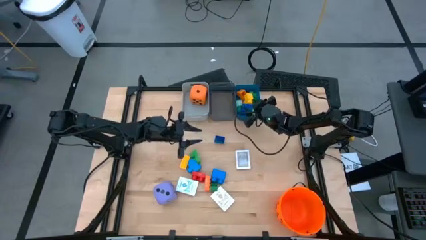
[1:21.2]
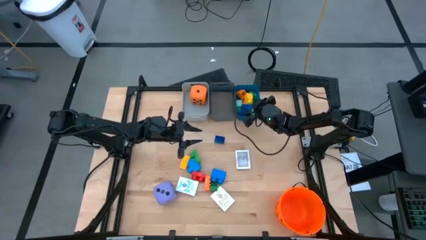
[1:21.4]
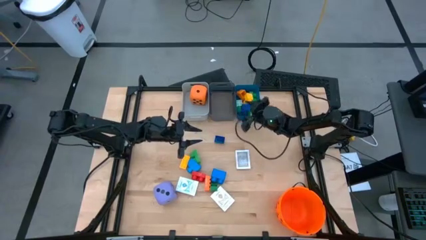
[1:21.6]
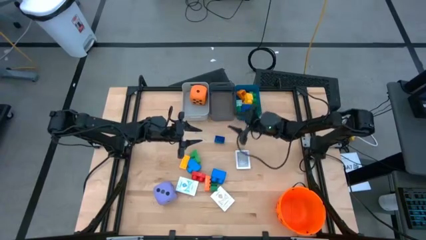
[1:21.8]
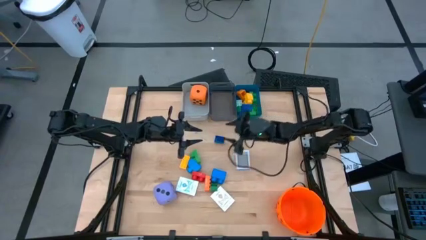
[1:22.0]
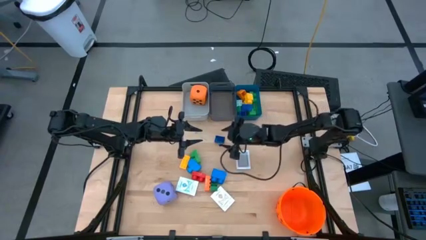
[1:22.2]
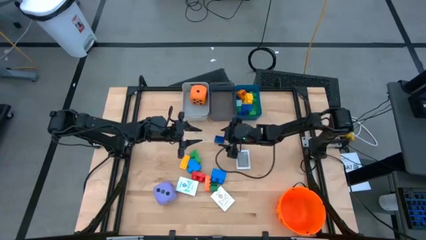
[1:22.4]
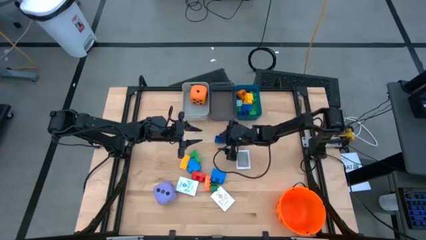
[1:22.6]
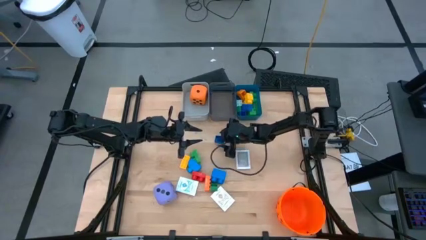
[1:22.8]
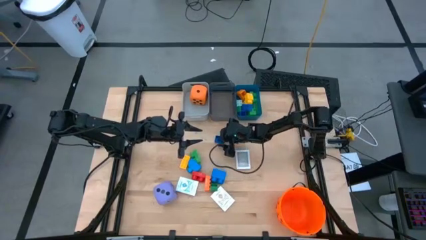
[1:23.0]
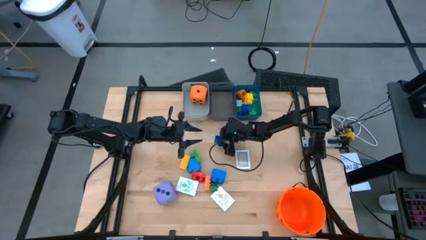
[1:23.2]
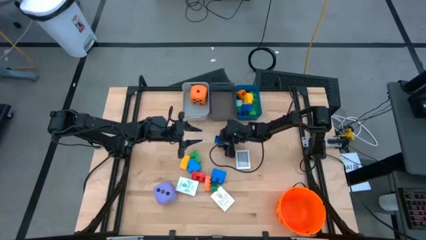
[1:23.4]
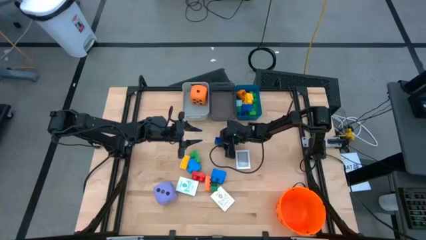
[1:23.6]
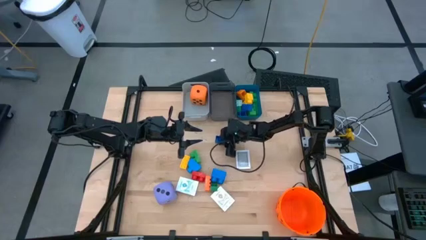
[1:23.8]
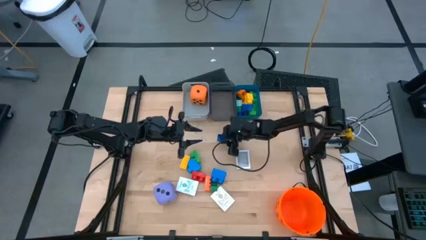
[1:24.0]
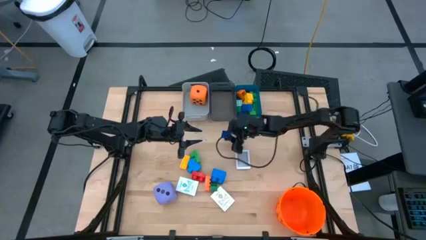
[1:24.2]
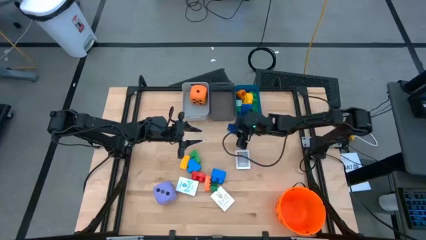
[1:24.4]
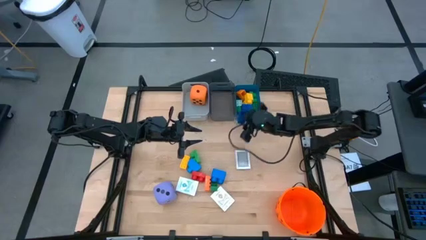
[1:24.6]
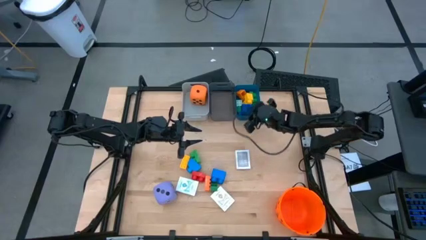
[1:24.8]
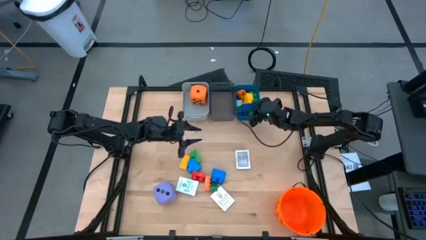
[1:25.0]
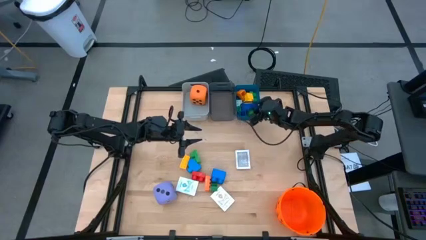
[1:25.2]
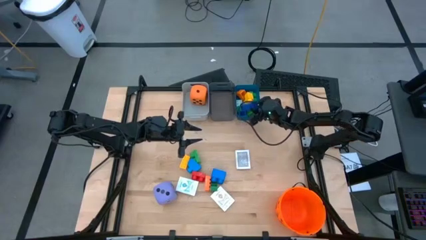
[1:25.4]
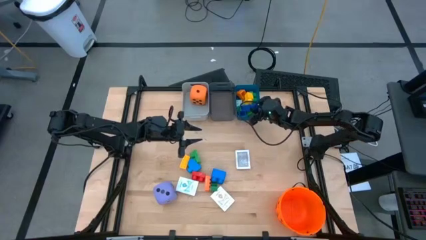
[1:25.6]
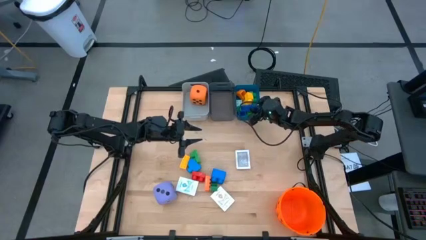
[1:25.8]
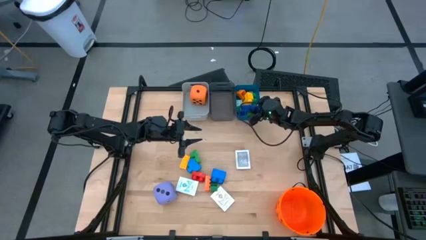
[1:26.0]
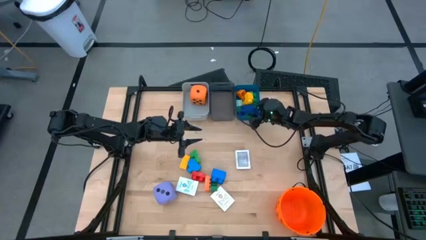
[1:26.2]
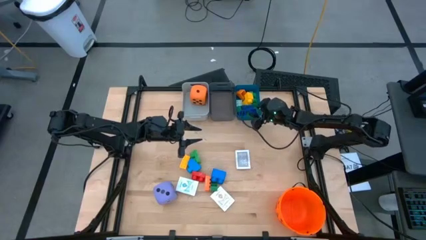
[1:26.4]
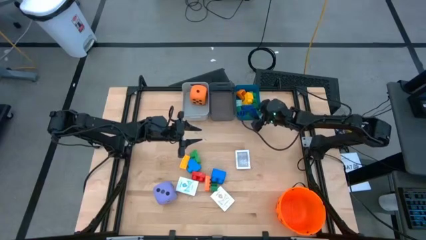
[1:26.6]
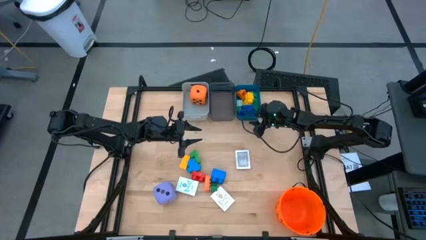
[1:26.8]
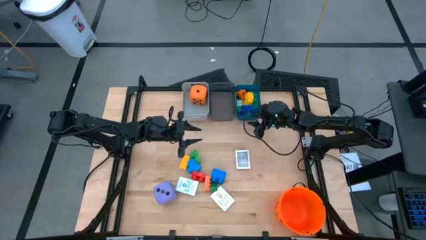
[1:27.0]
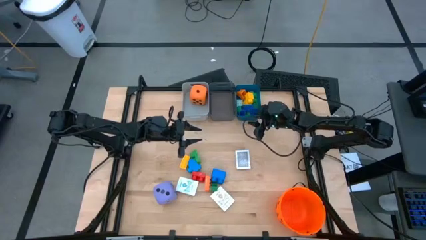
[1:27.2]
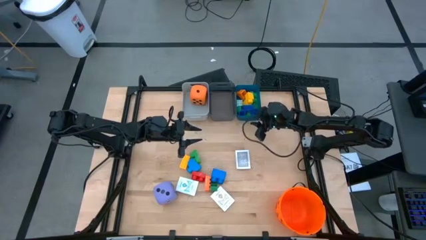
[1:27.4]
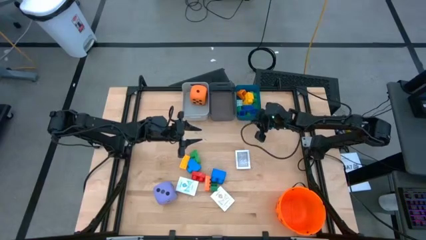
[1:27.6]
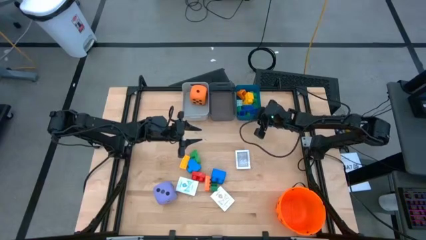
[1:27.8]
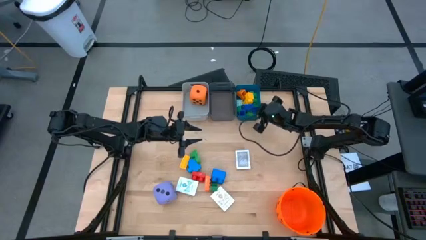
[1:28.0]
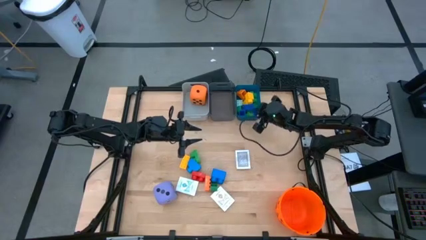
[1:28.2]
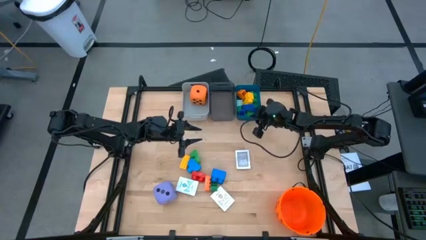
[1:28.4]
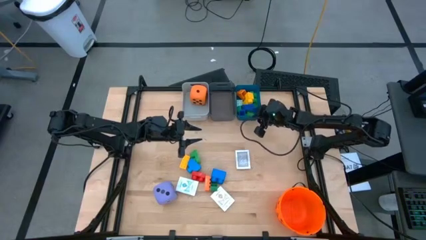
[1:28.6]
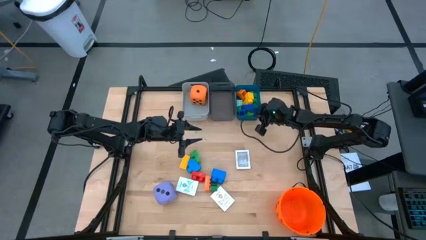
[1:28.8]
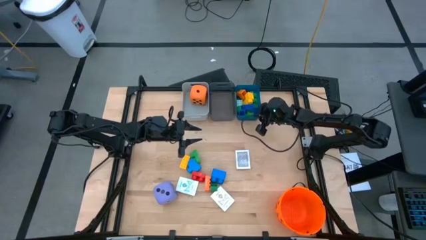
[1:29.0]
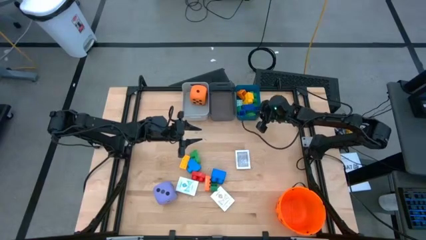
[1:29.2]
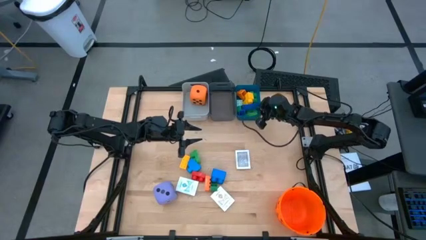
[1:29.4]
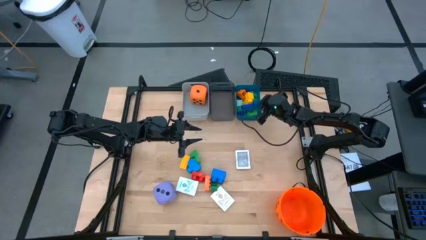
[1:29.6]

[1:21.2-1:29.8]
Task: Pick & Place Toys
Put the blue game piece into the blue bin

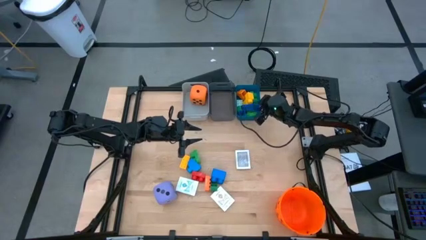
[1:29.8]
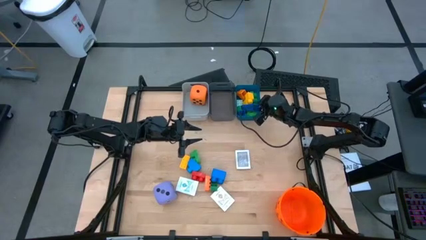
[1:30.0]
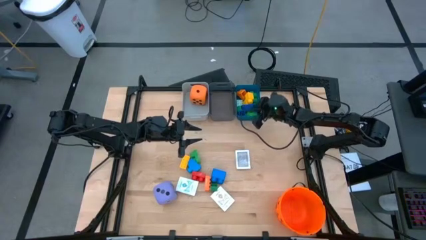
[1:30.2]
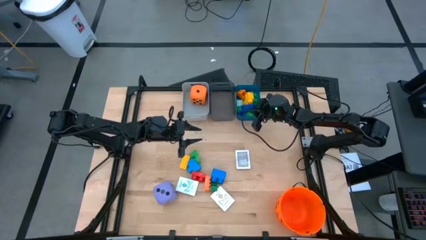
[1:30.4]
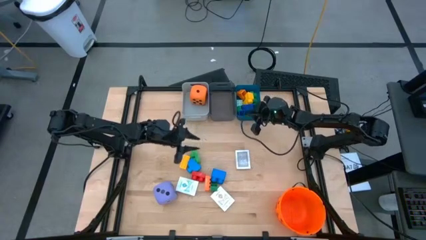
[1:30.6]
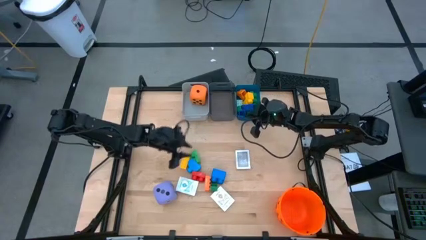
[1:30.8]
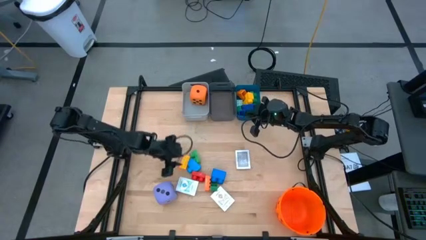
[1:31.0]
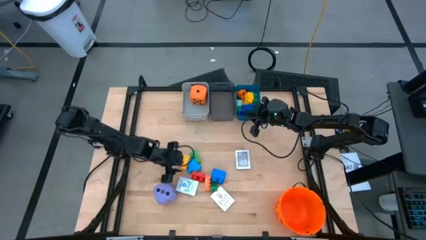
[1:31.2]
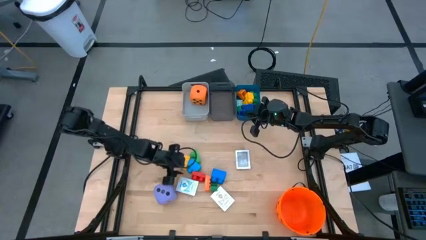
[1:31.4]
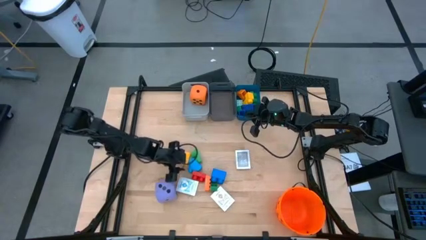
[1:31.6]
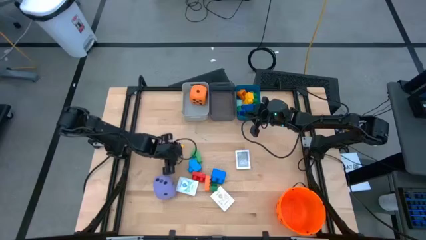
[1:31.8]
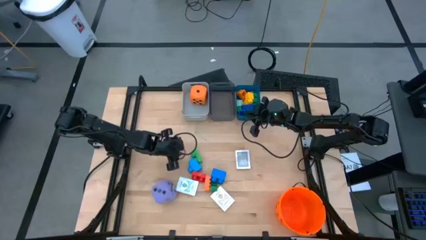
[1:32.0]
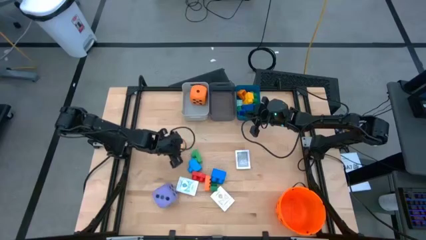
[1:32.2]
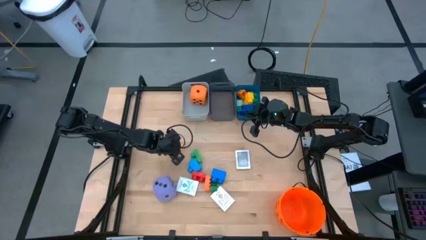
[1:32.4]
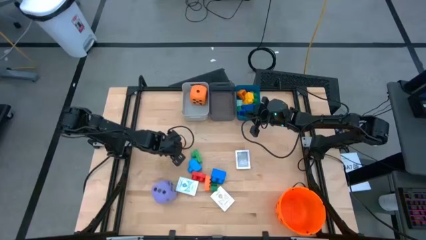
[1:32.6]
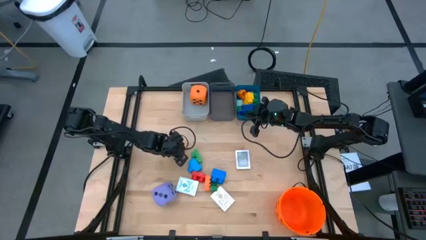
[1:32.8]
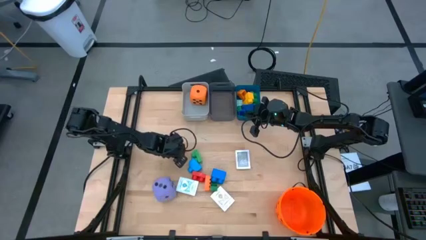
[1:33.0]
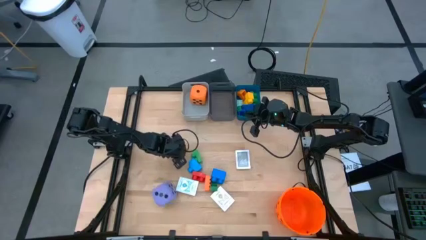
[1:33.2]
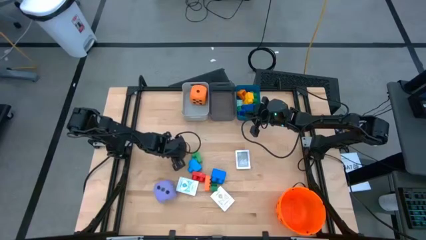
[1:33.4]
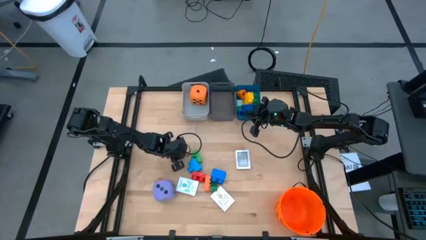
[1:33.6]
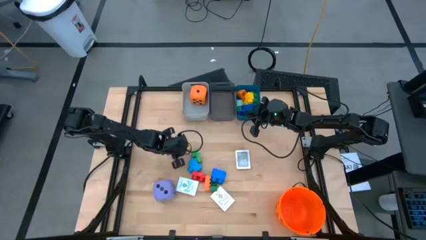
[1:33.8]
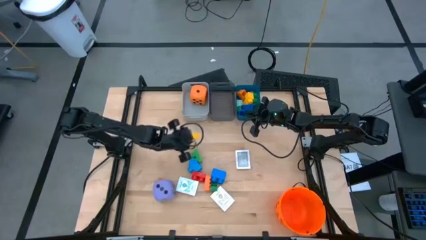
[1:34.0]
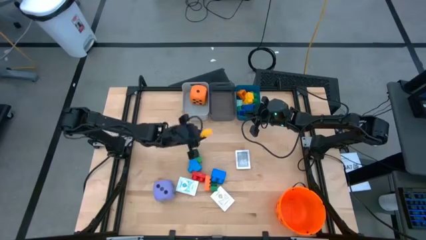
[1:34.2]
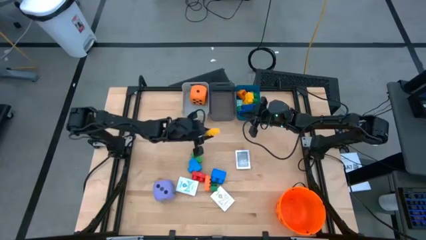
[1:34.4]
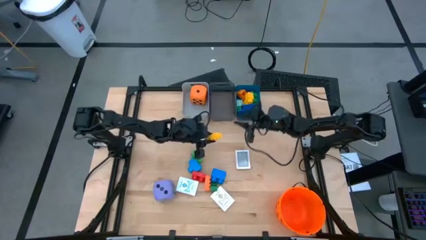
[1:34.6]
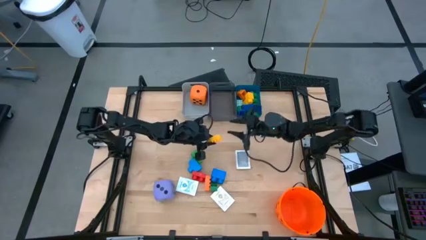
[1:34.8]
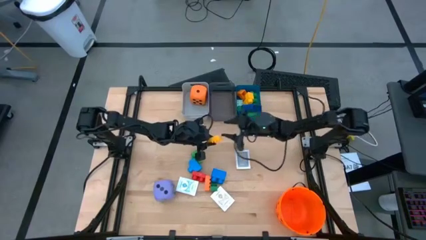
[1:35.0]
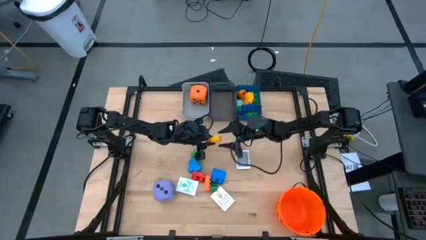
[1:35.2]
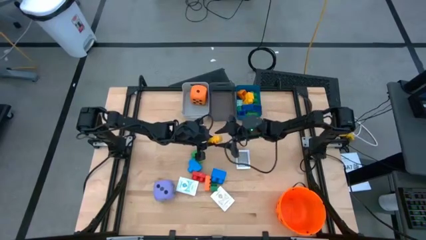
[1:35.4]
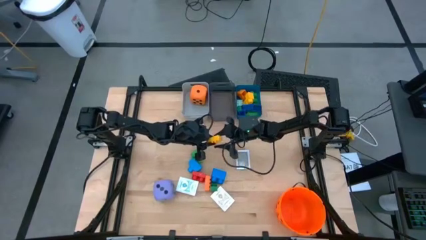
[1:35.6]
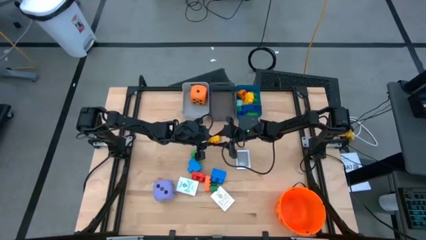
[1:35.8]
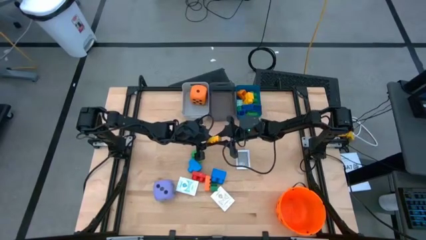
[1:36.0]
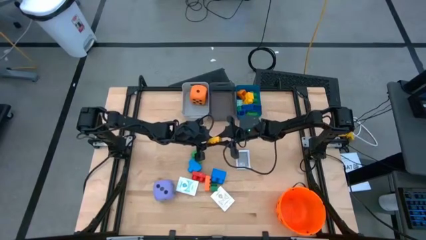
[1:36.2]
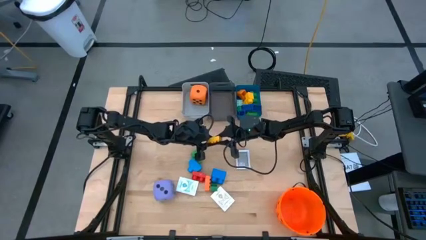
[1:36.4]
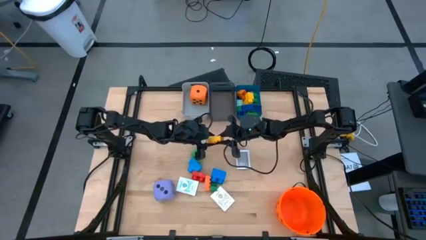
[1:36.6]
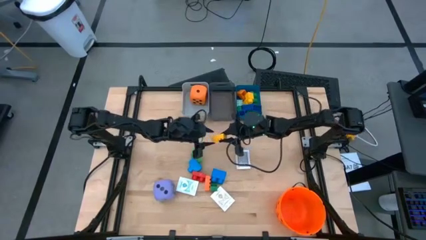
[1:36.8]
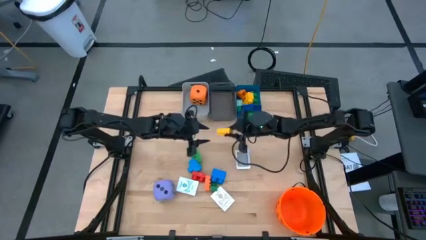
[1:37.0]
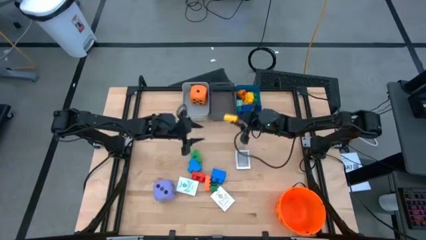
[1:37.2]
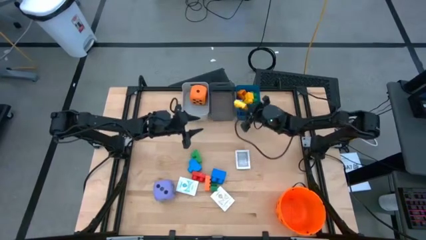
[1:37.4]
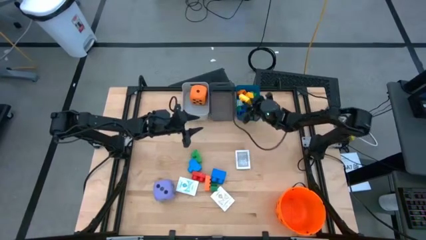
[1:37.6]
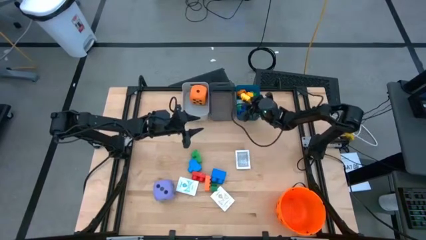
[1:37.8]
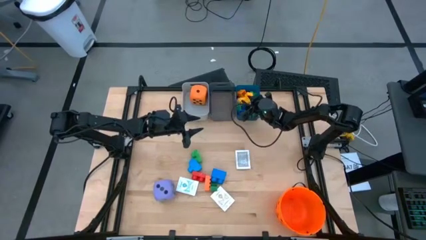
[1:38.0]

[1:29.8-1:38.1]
Put the yellow game piece into the blue bin
